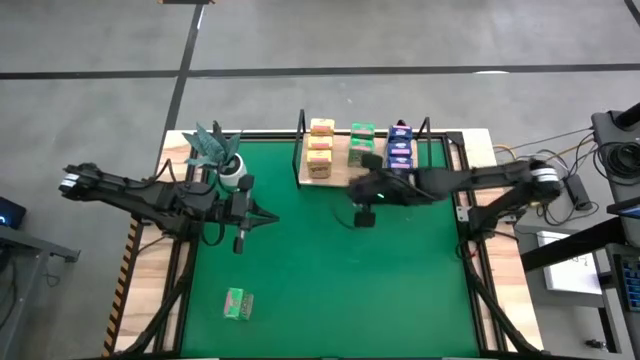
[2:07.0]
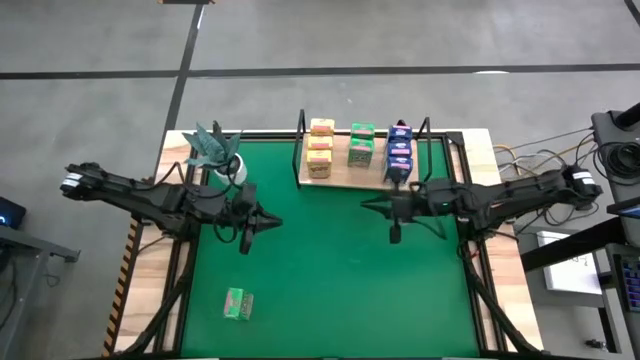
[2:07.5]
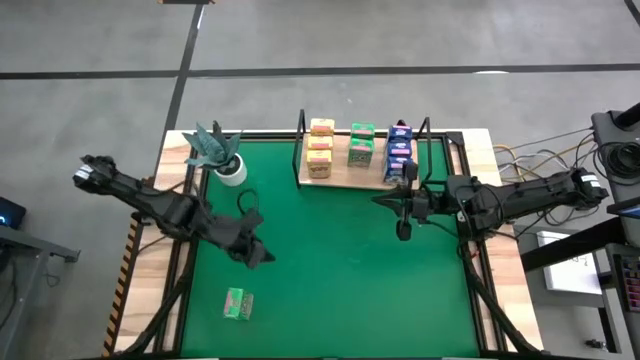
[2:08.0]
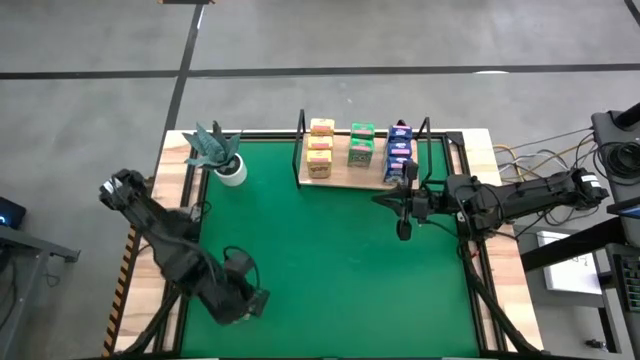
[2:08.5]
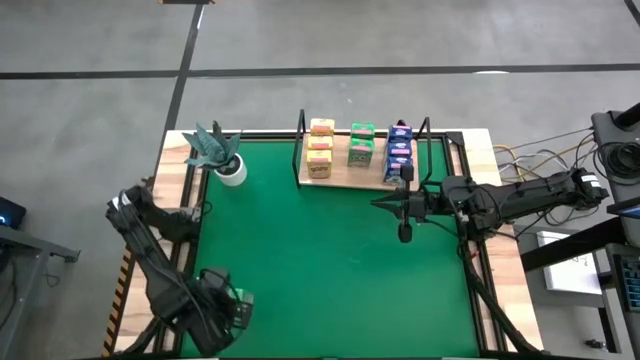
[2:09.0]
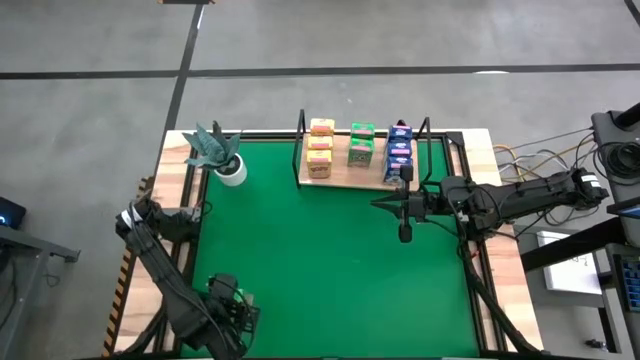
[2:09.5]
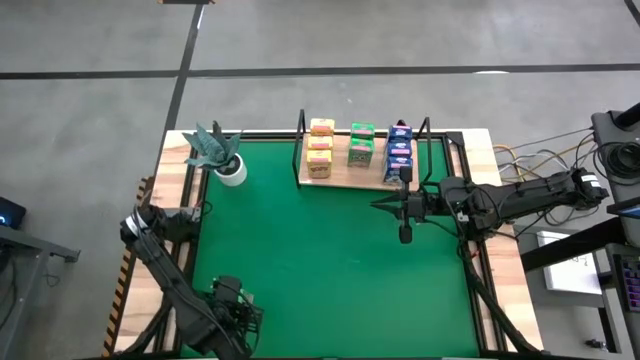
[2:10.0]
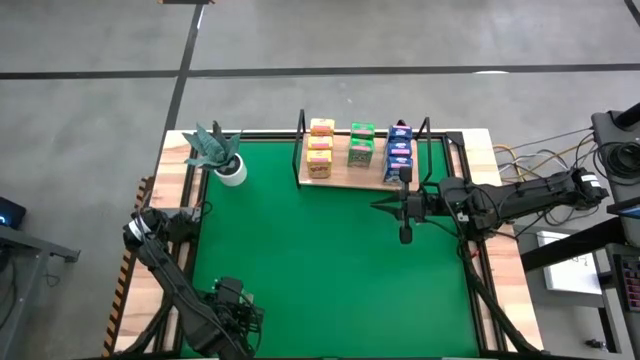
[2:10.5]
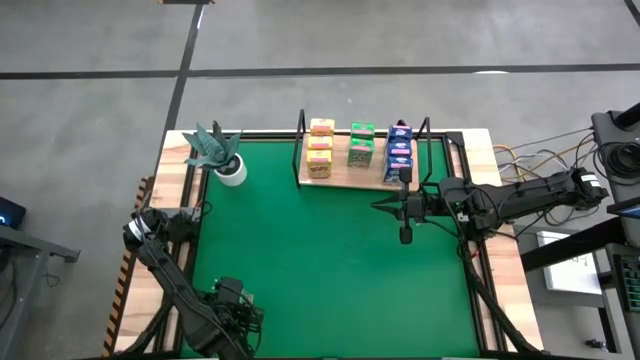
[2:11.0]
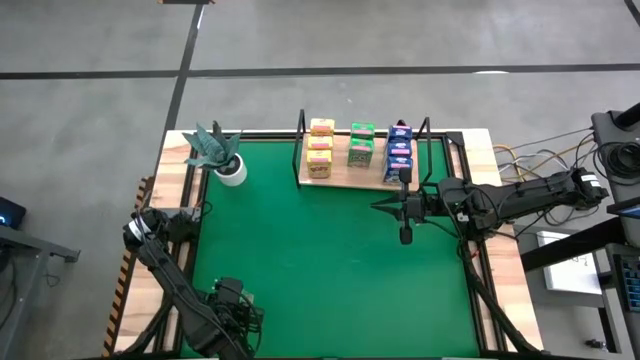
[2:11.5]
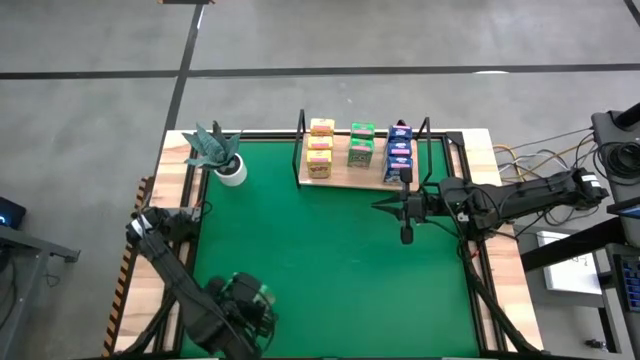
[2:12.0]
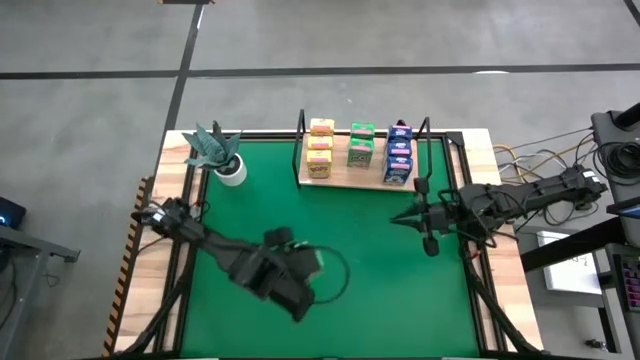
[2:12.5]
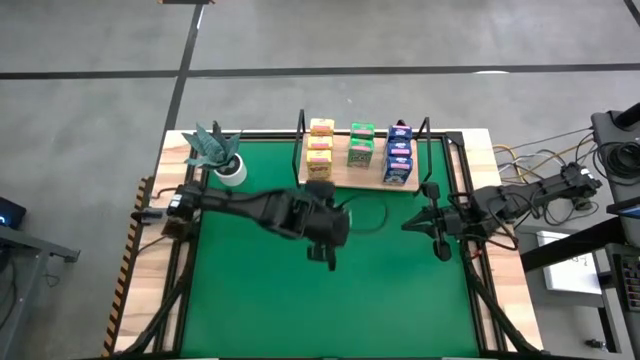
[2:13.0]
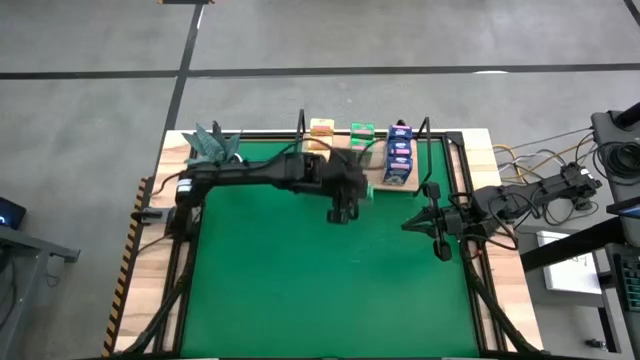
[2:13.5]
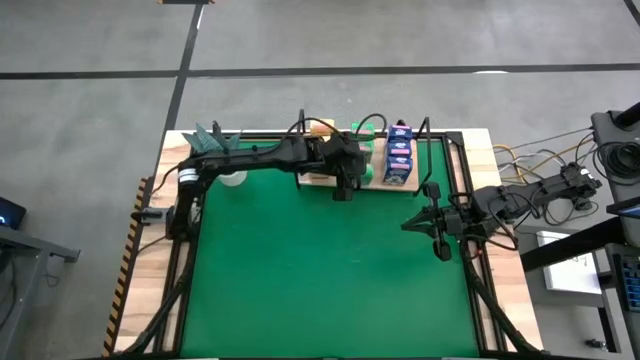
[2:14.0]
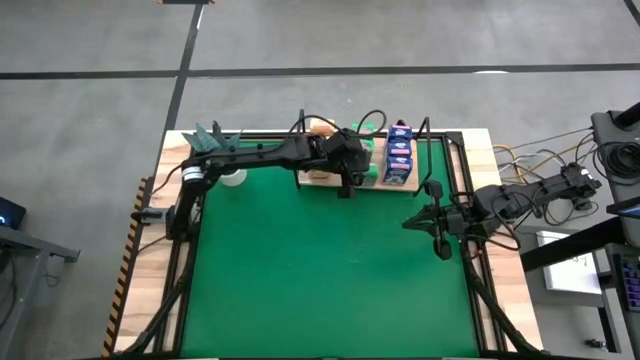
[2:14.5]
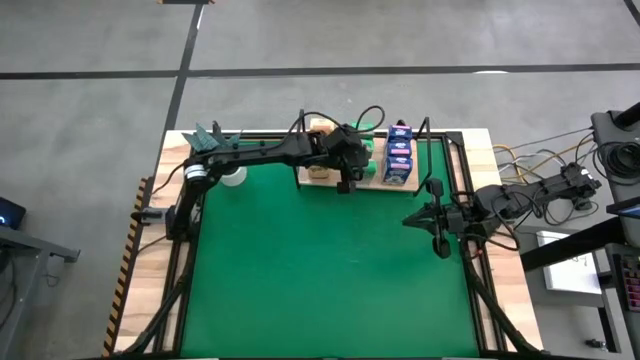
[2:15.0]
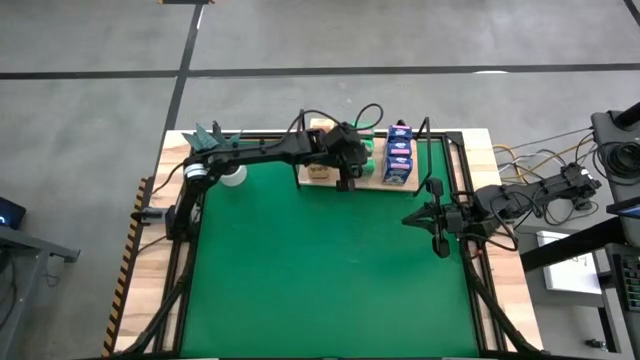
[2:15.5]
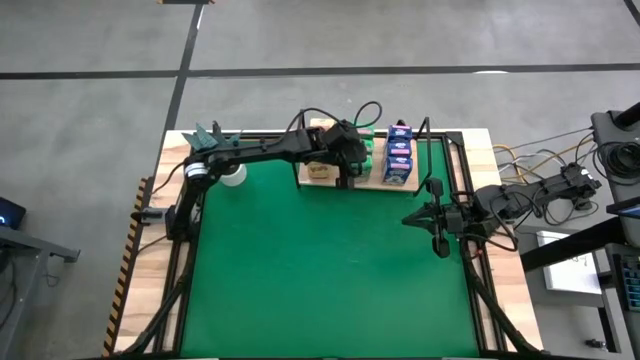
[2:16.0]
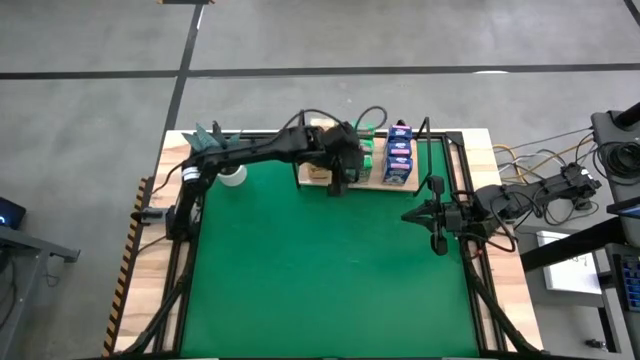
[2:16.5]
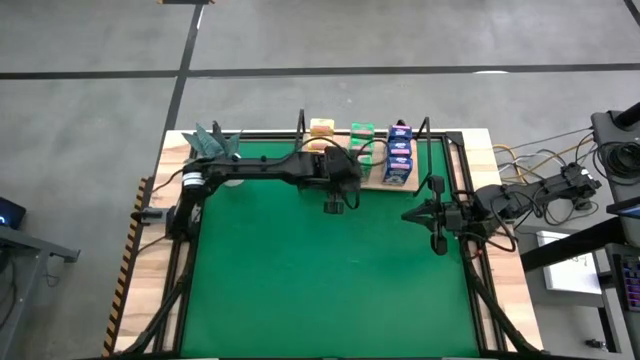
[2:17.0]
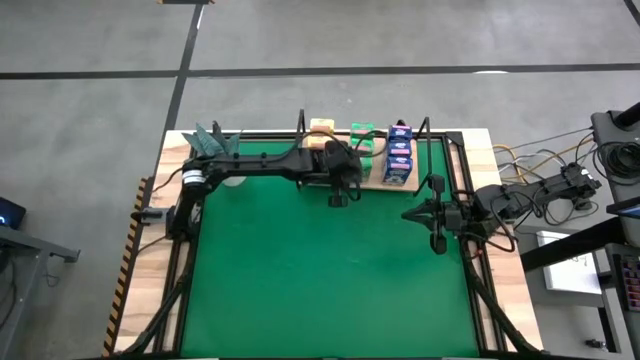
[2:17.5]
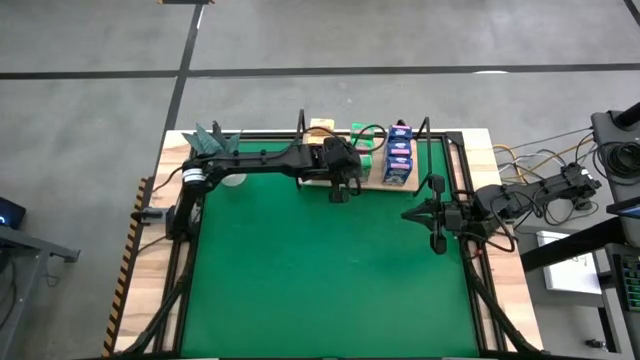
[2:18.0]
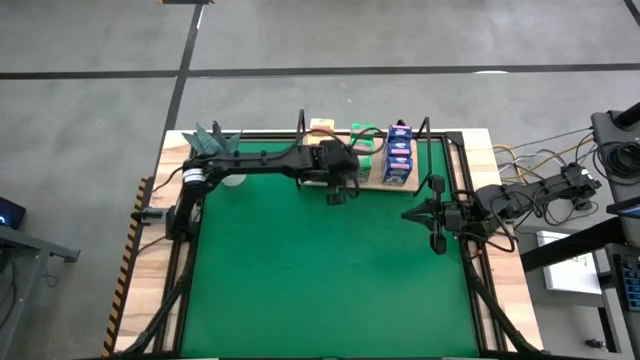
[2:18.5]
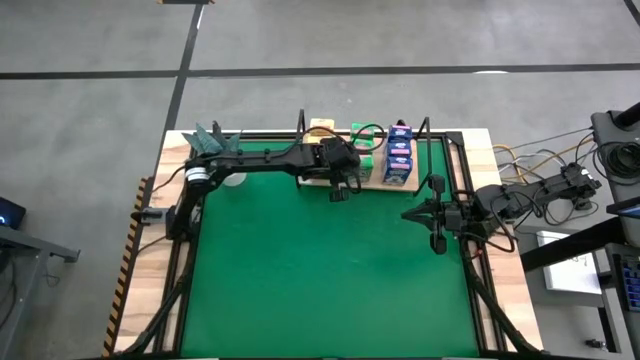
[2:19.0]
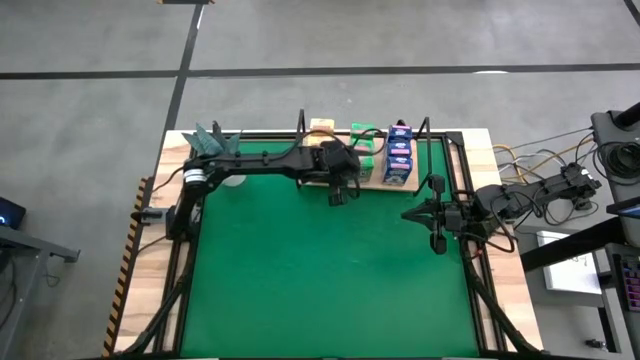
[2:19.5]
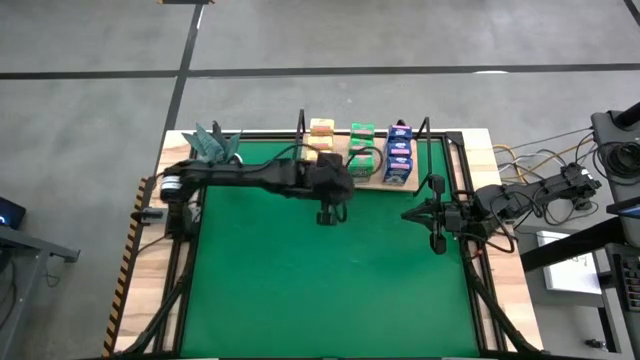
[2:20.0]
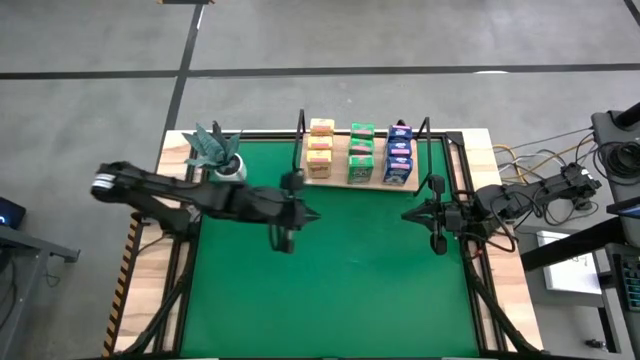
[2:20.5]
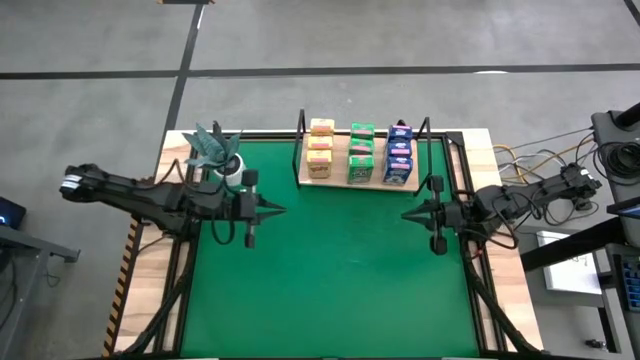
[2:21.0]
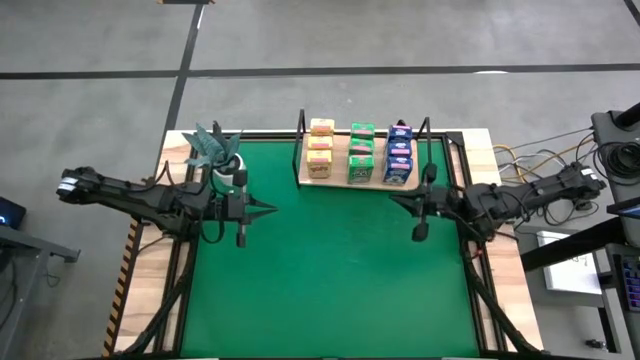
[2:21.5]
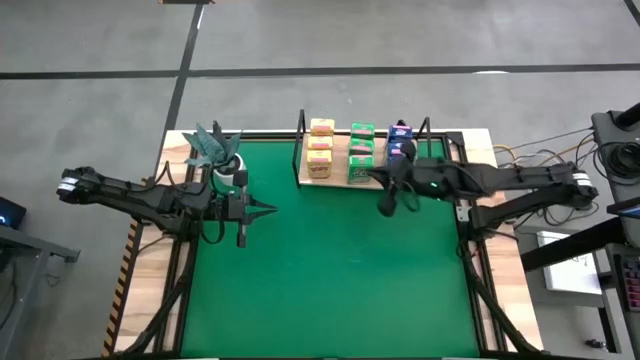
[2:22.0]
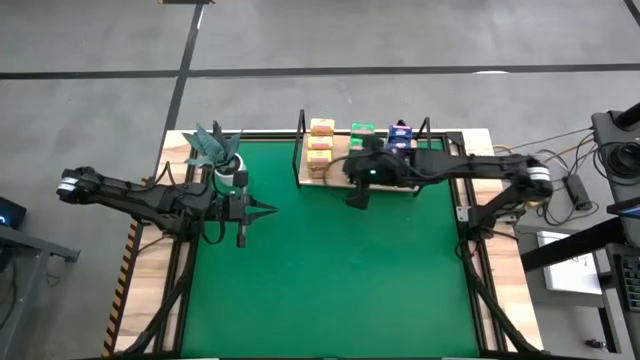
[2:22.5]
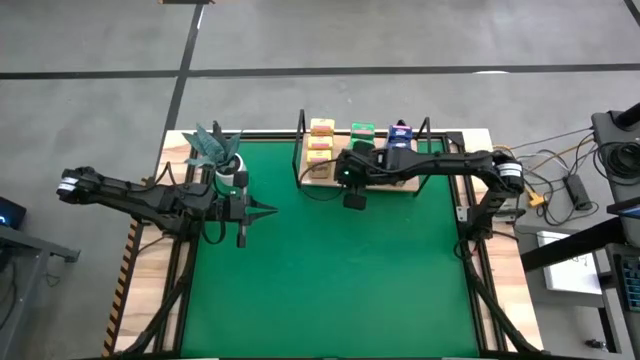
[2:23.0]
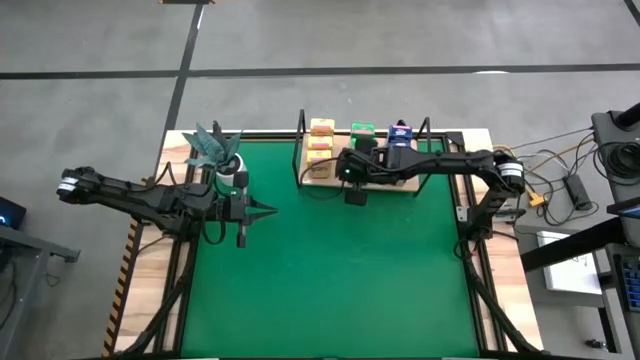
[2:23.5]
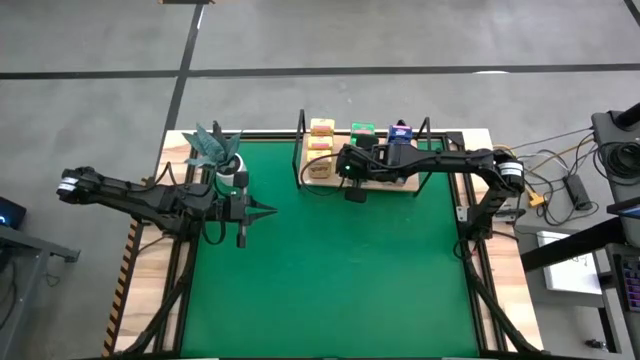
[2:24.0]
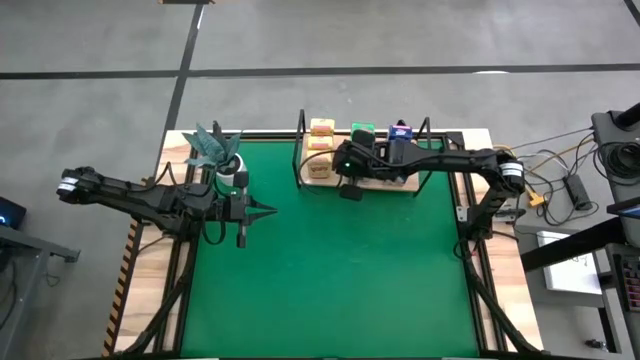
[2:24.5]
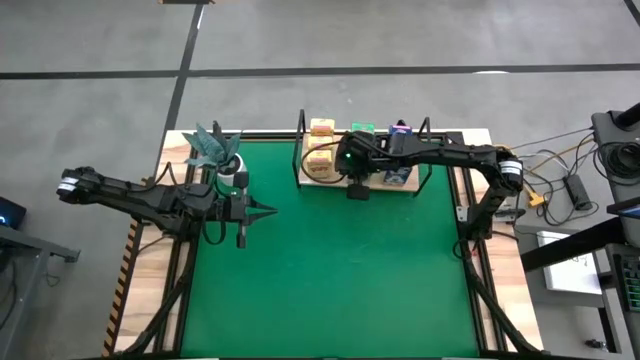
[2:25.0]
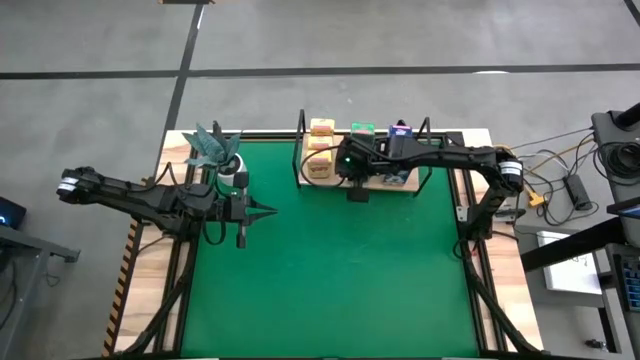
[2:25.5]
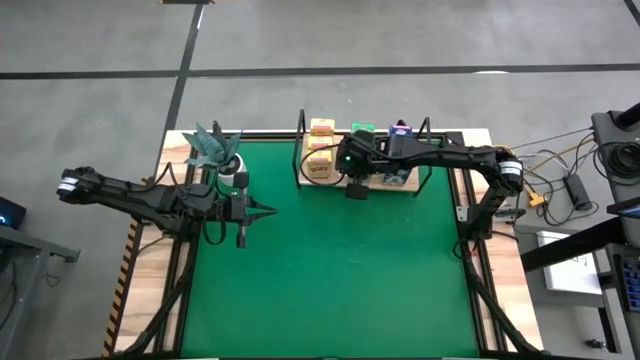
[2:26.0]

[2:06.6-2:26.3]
Task: Stack cereal on shelf
Put the green cereal box on the shelf

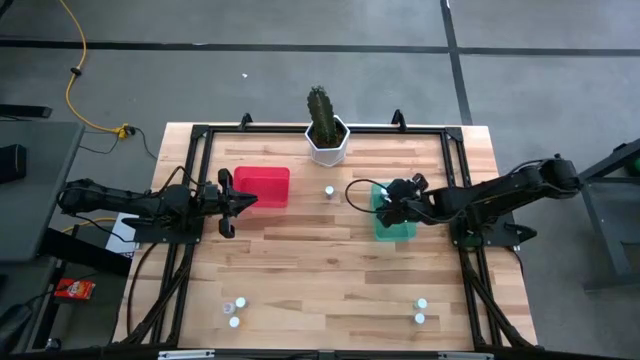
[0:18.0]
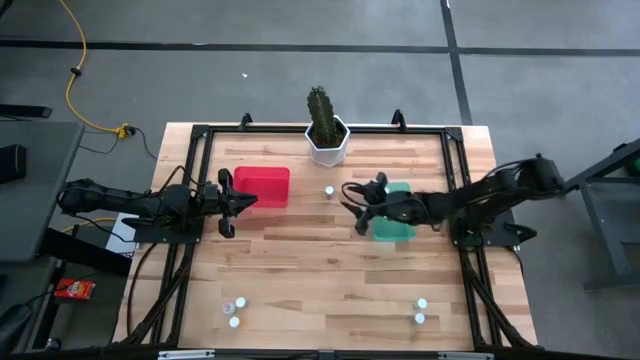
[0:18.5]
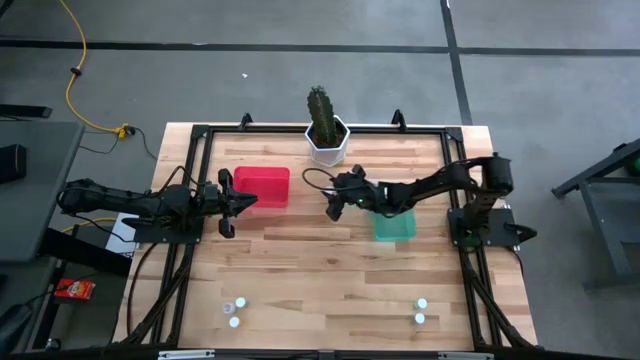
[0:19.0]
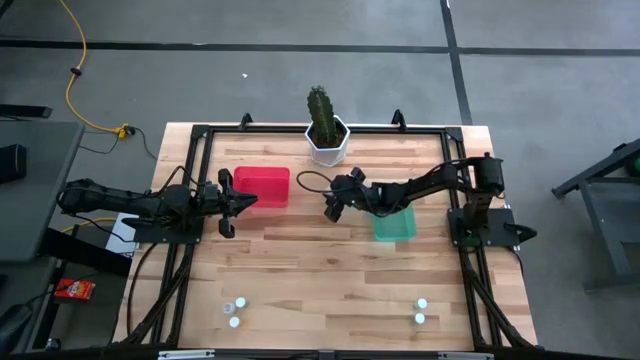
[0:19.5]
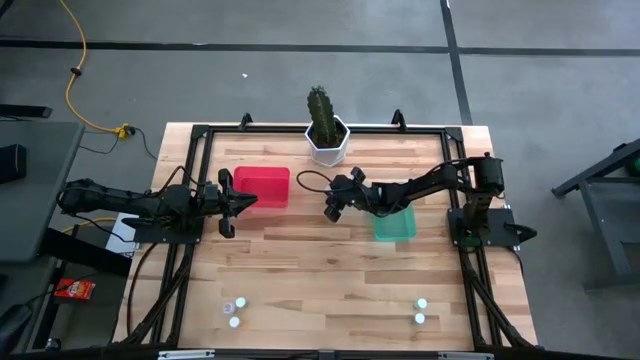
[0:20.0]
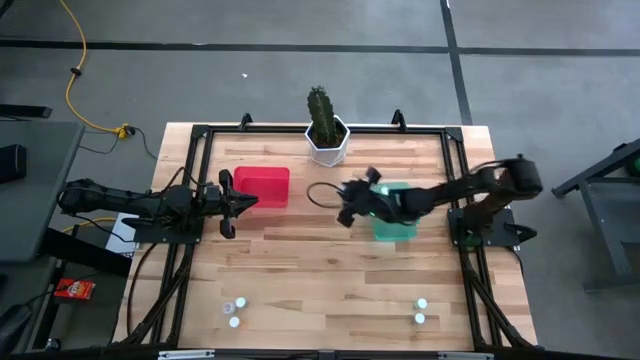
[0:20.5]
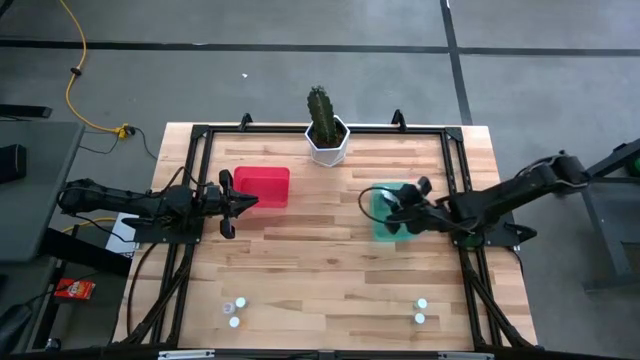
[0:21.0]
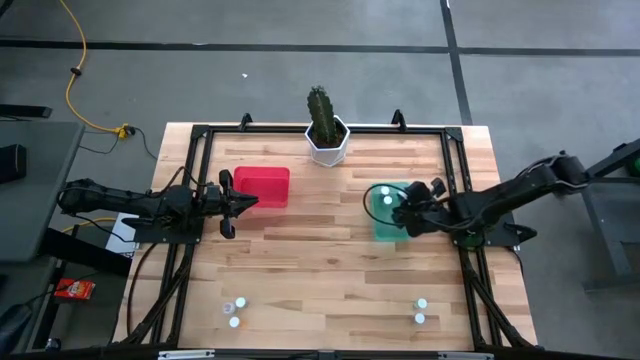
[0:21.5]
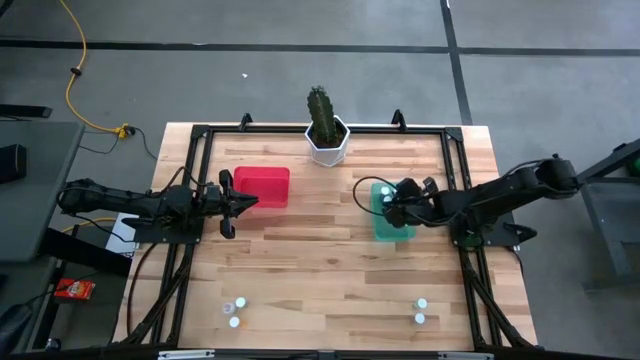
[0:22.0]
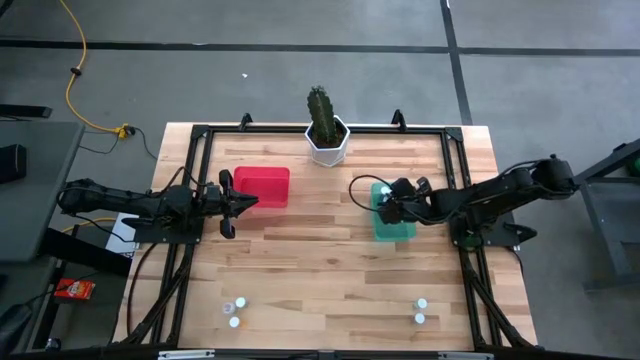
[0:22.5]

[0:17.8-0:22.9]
Task: Pick and place medicine bottles into bin by pill shape (circle, oval)
Put the top blue capsule bottle into the green bin
